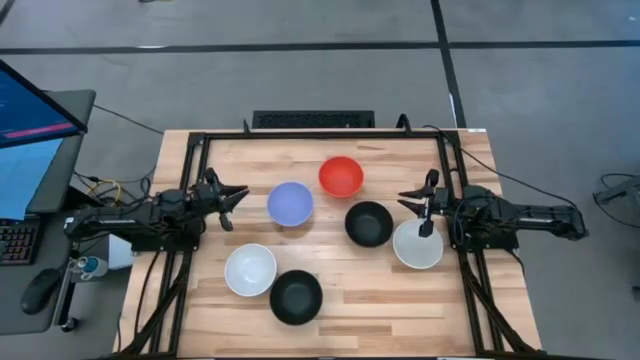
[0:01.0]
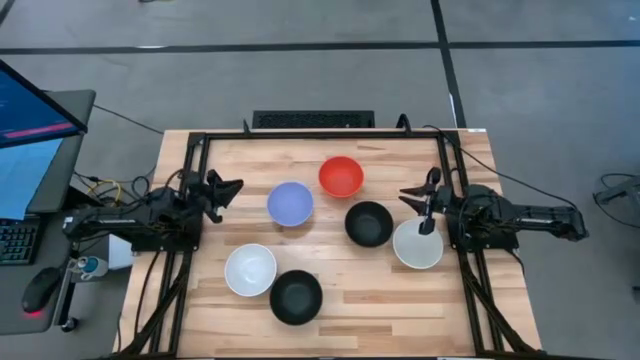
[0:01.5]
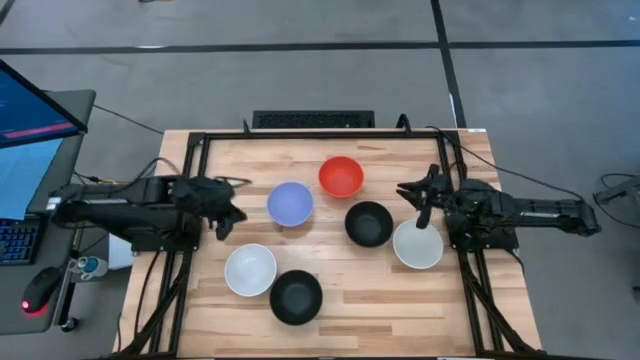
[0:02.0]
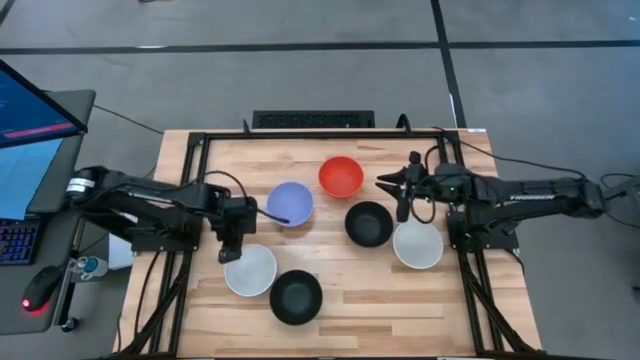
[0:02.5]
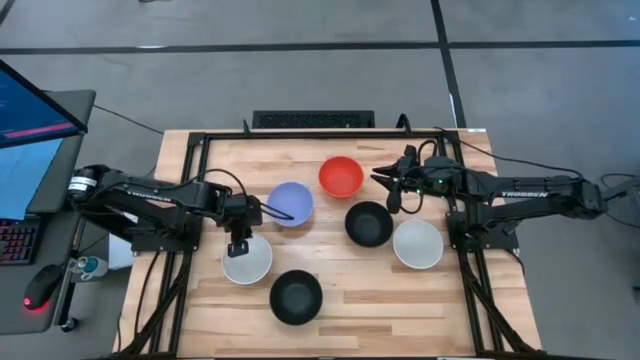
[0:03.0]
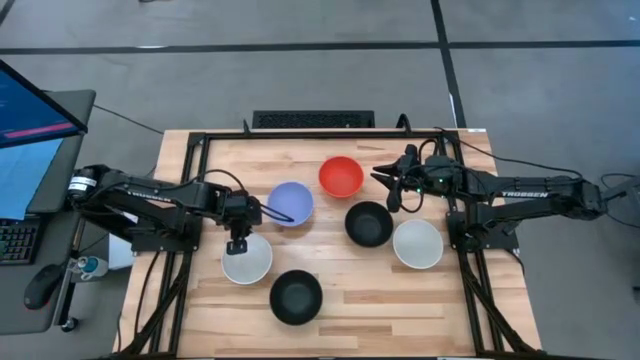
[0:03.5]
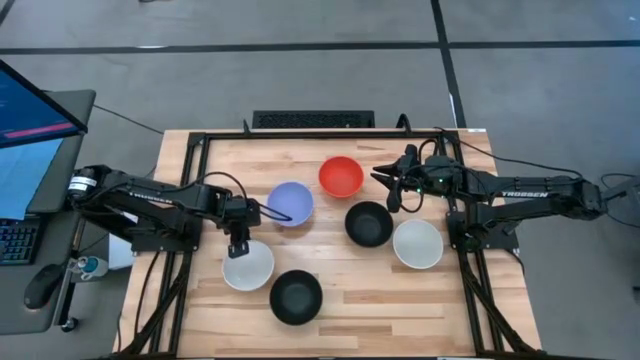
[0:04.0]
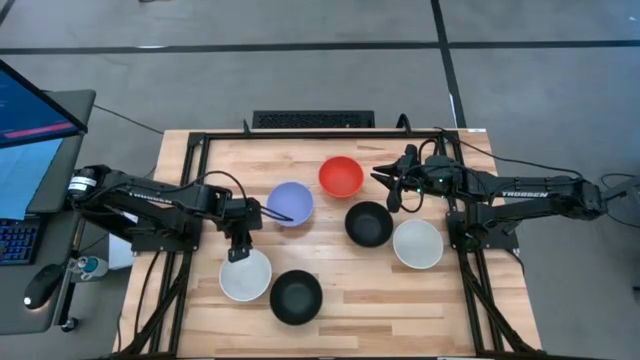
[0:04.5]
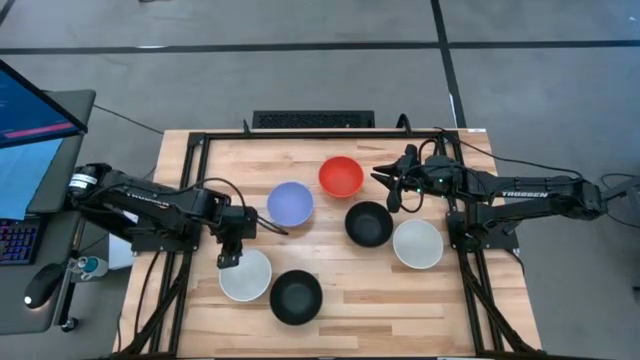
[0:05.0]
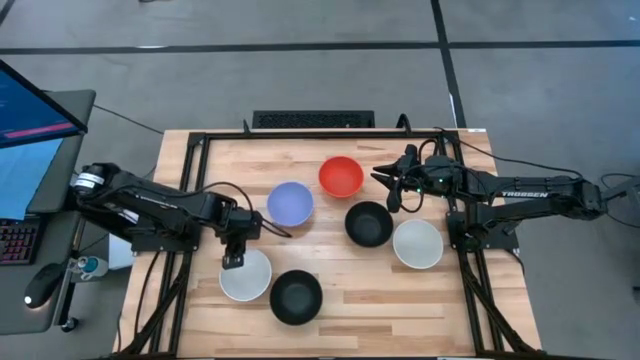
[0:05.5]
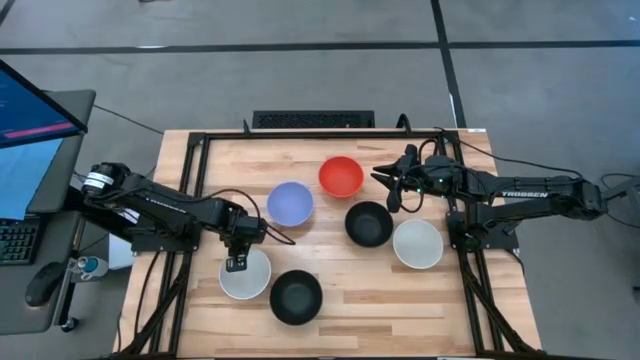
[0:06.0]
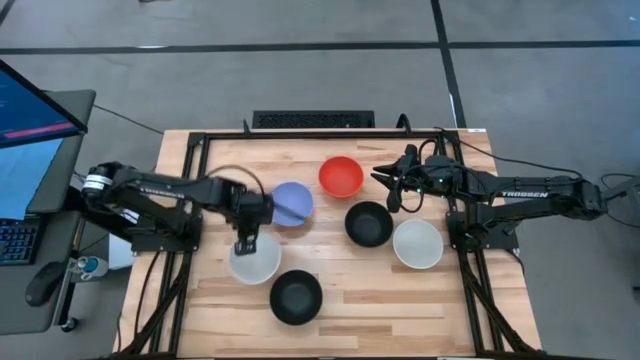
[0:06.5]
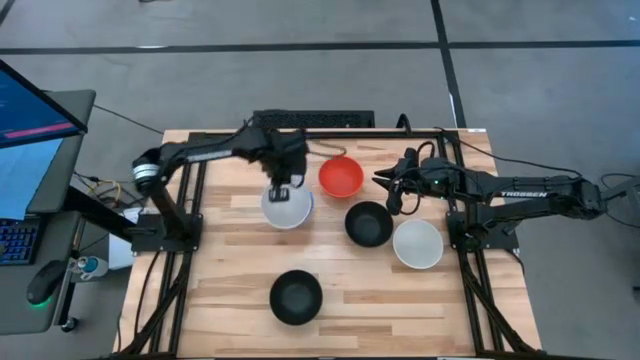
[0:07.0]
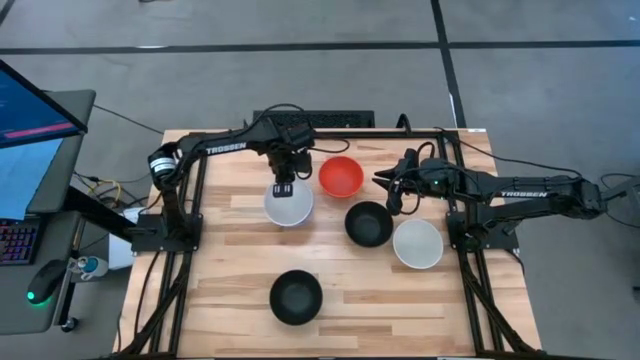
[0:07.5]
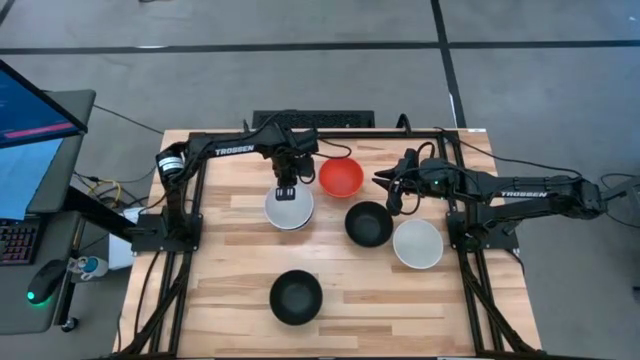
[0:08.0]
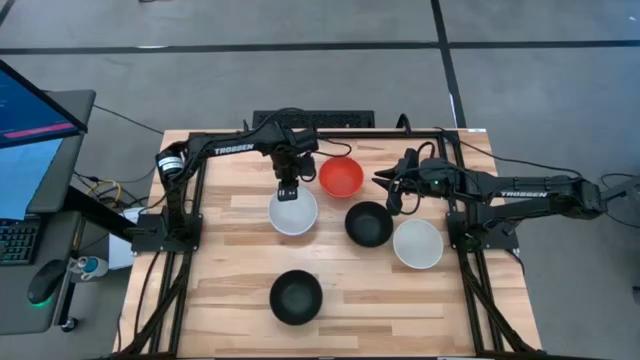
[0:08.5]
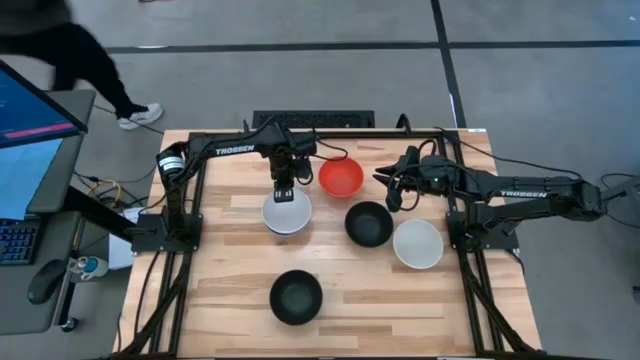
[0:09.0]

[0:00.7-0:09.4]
Task: Nest bowls inside each other
Stack the left white bowl on top of the purple bowl

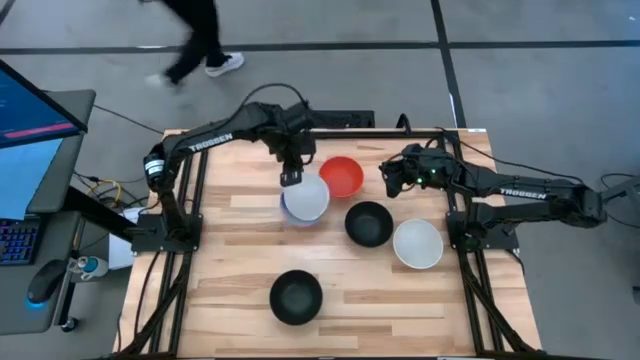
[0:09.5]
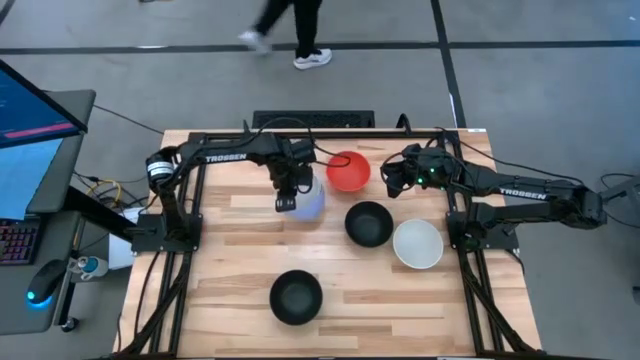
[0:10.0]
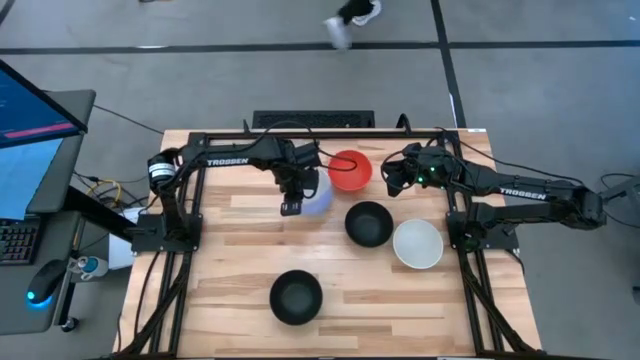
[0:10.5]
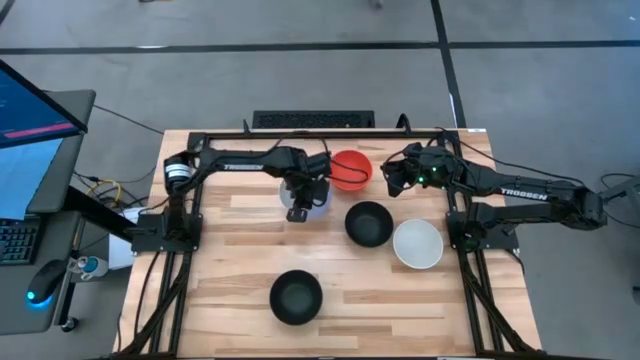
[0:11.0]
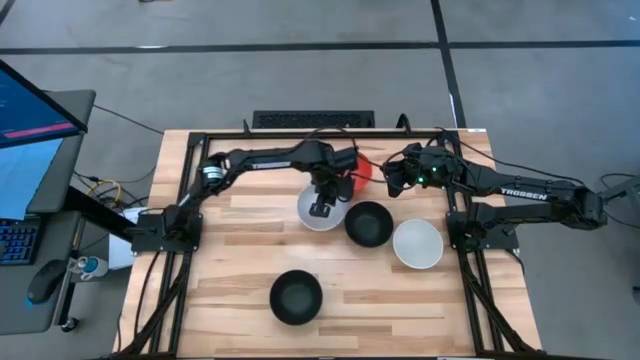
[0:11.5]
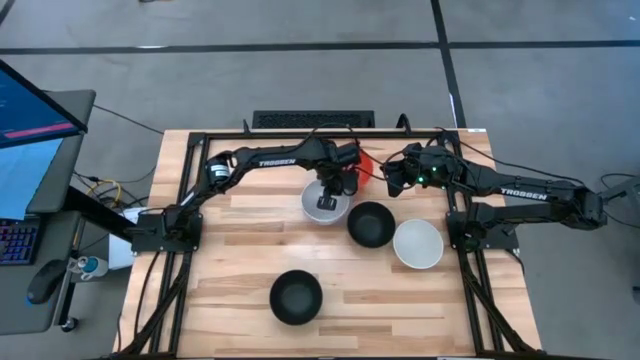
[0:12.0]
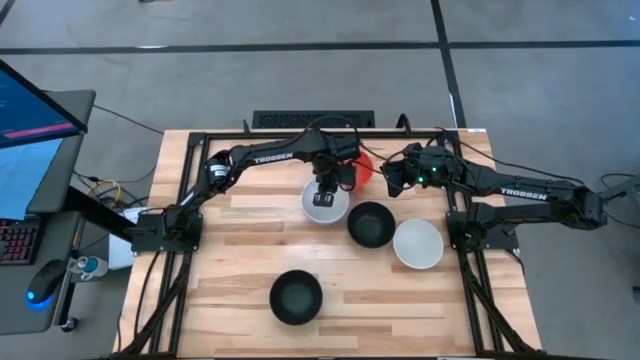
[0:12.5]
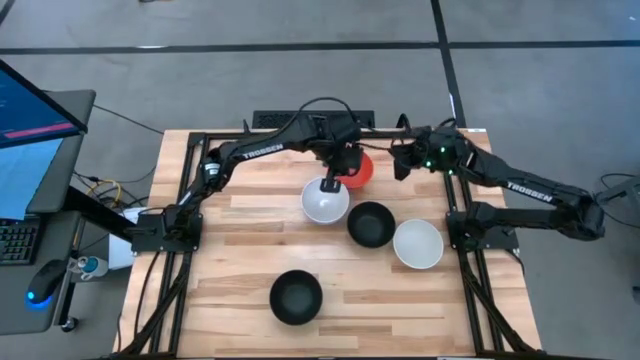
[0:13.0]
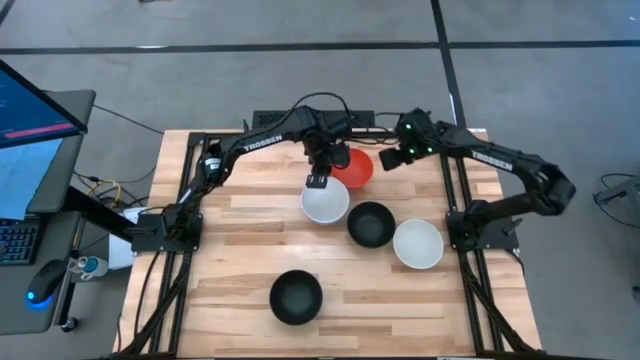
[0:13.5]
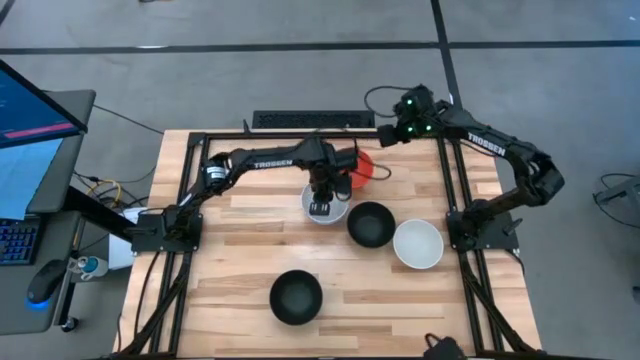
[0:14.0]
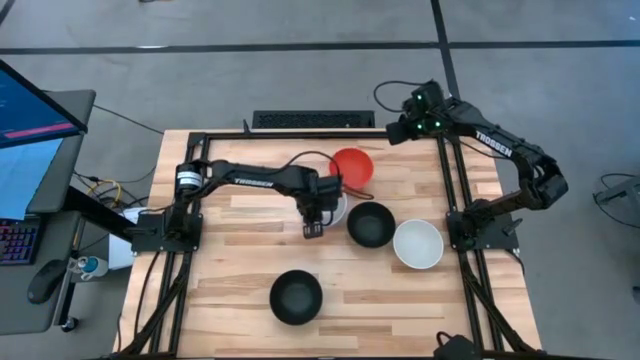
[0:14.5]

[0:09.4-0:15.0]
Stack the left white bowl on top of the purple bowl

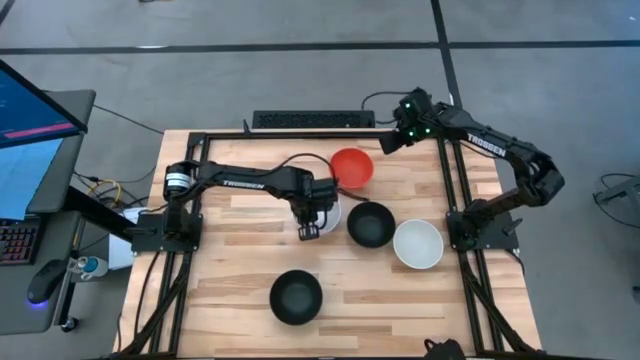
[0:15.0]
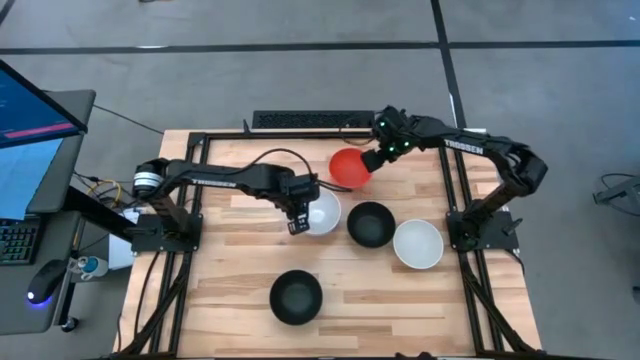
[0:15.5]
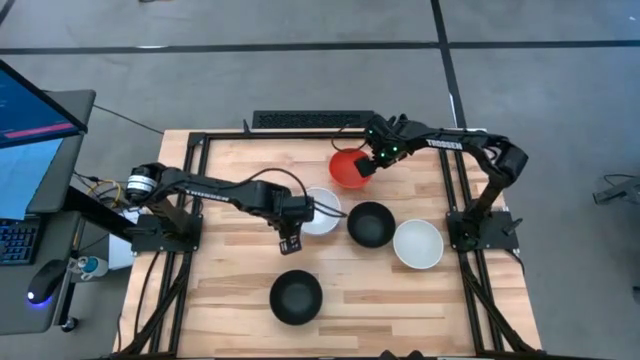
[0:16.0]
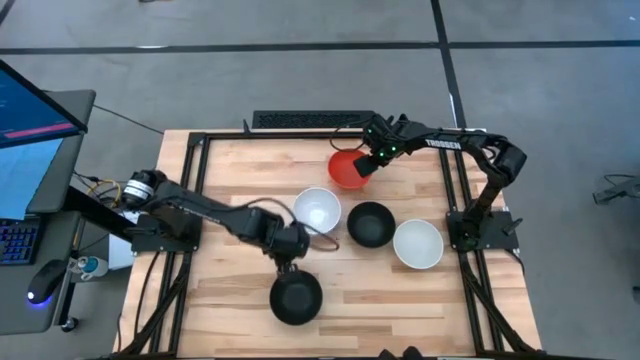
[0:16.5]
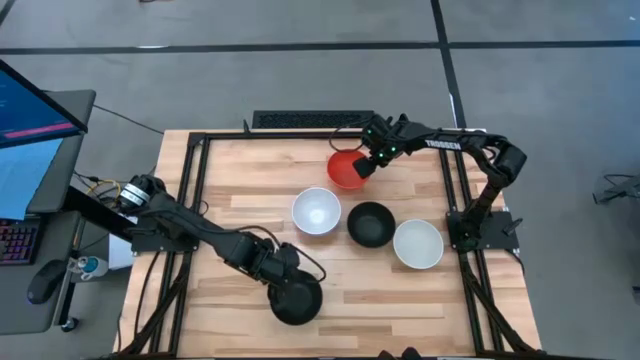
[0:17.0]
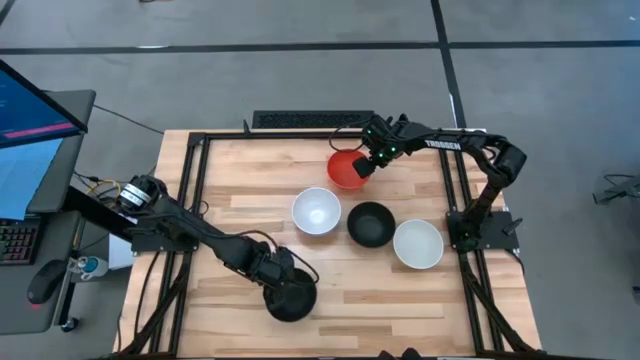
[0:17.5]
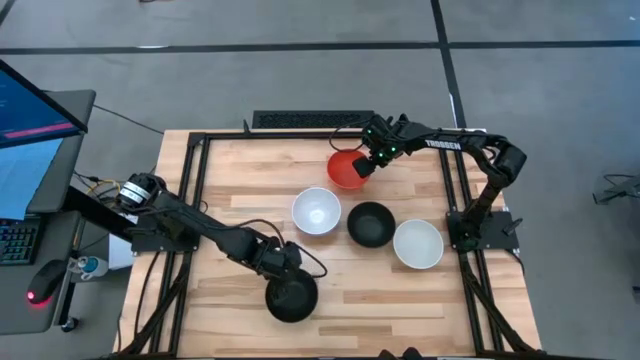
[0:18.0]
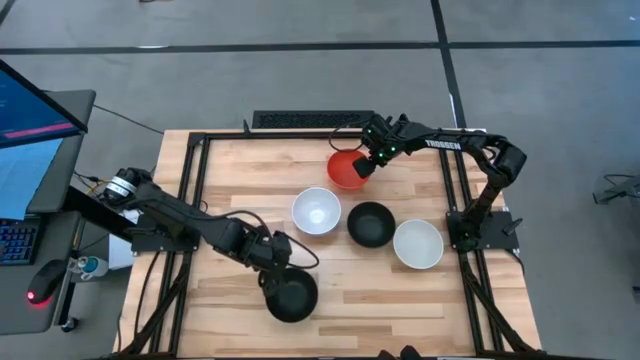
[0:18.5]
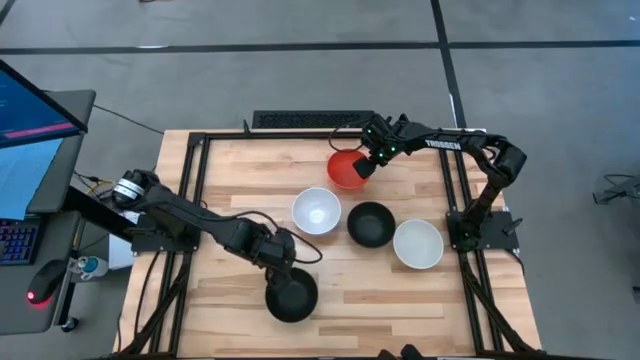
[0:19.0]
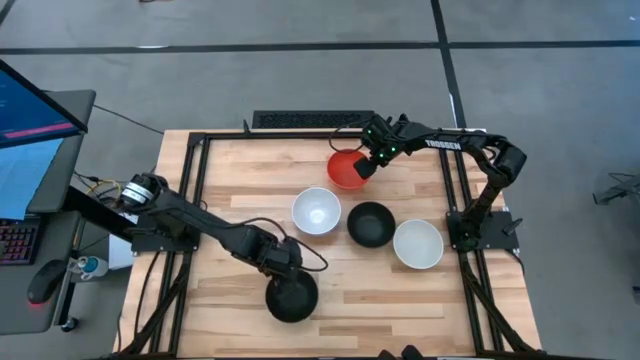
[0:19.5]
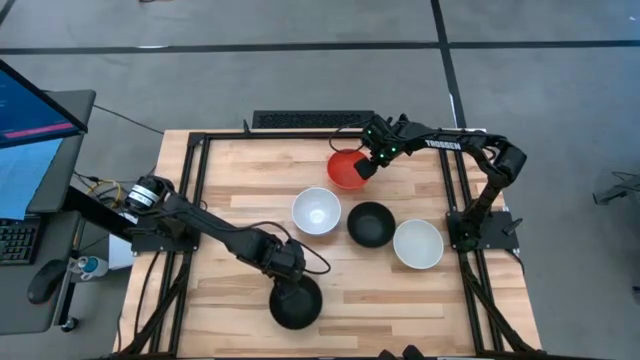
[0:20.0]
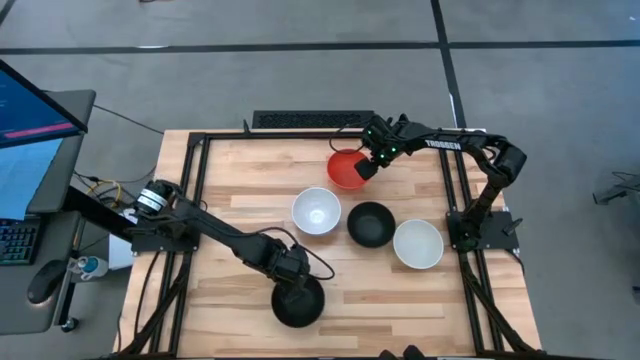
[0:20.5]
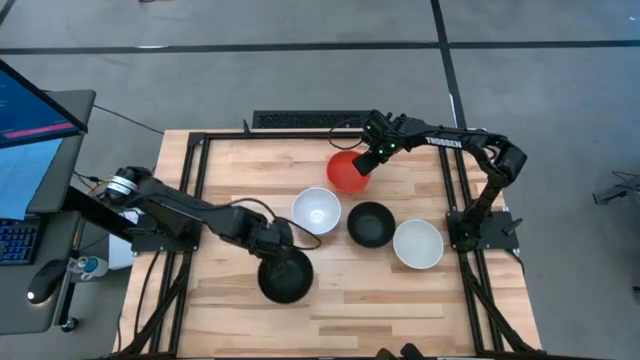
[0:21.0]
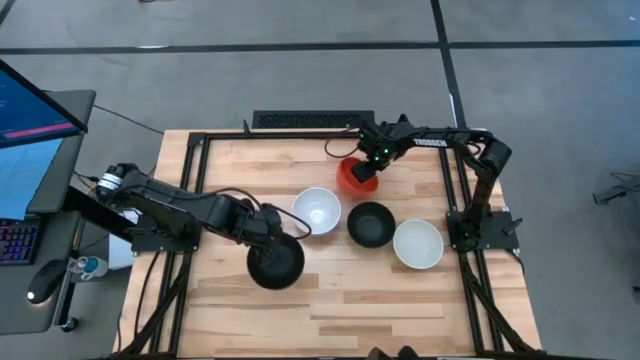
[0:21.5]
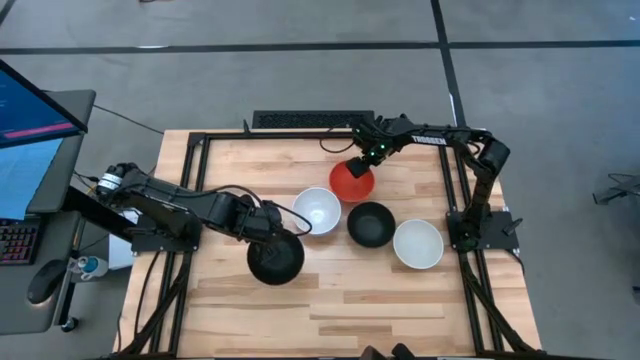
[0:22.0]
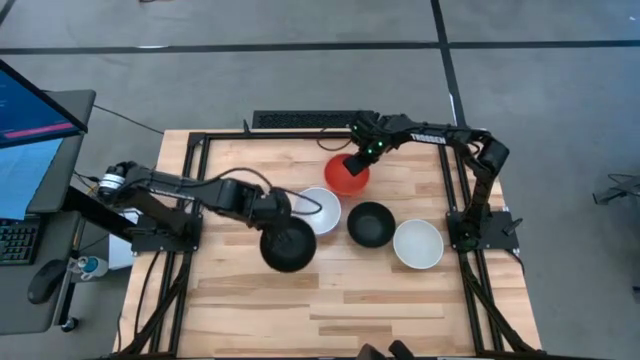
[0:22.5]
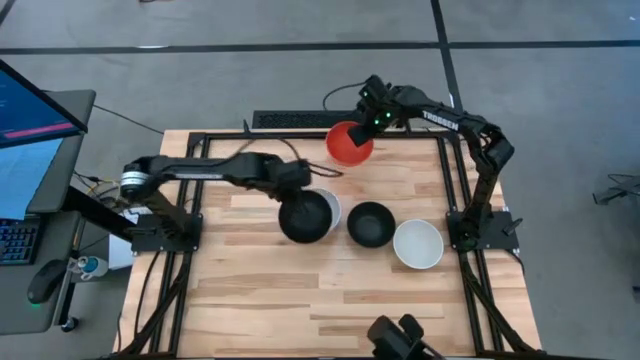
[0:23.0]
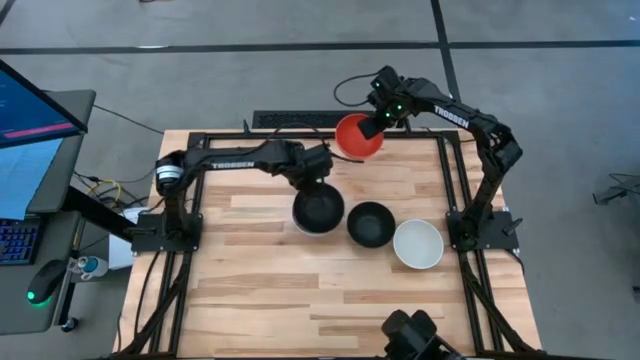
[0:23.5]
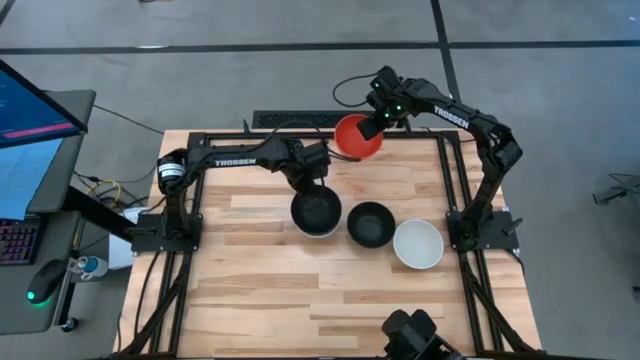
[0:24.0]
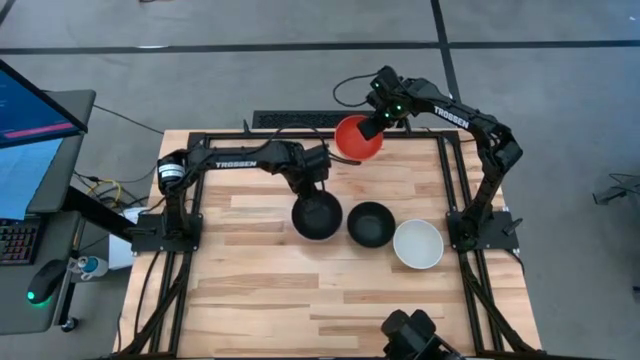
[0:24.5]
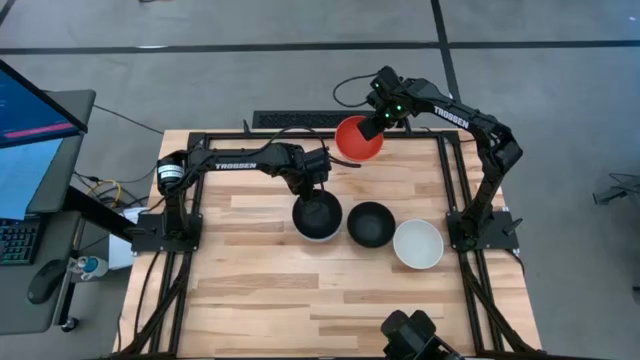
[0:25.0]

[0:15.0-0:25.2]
Stack the bottom black bowl on top of the stacked white bowl
